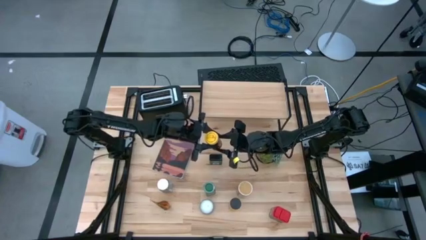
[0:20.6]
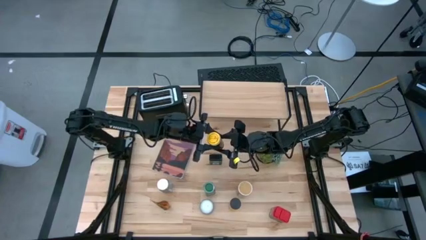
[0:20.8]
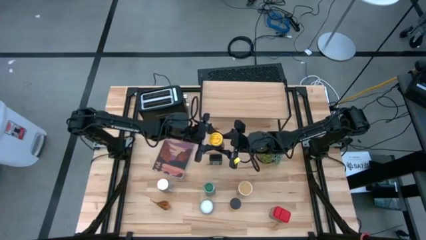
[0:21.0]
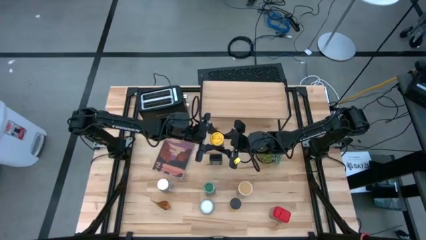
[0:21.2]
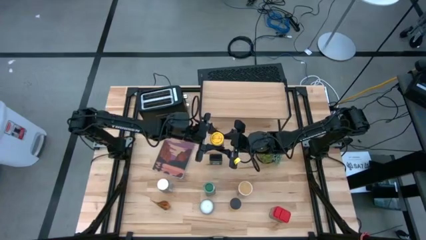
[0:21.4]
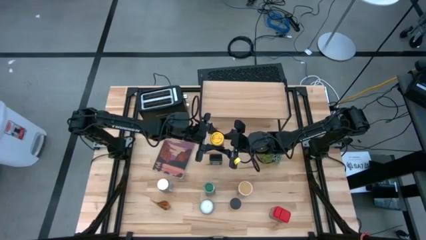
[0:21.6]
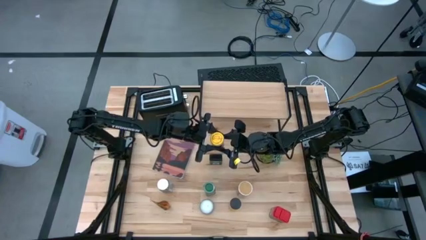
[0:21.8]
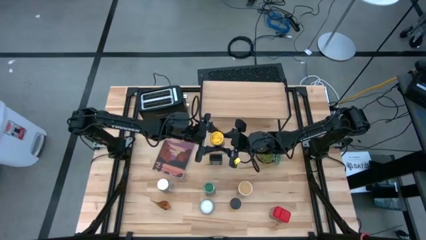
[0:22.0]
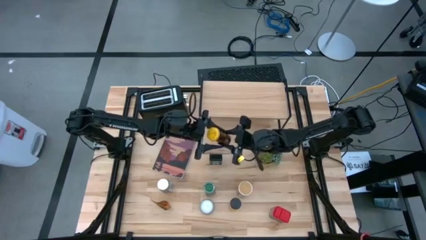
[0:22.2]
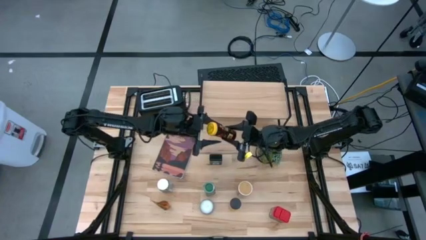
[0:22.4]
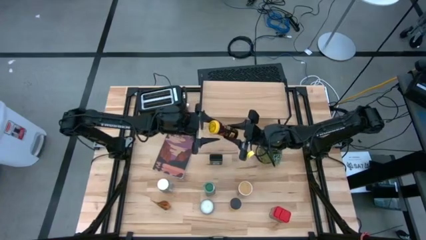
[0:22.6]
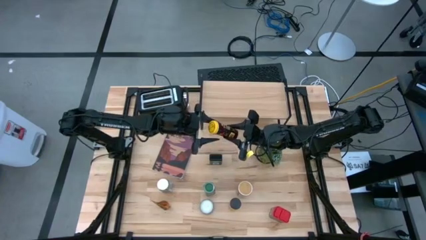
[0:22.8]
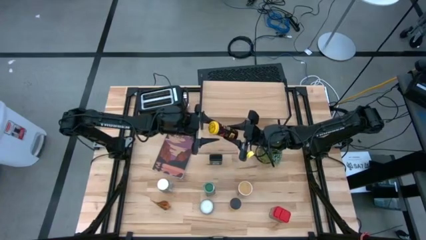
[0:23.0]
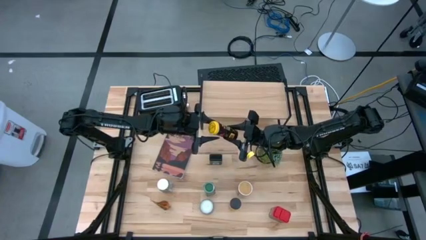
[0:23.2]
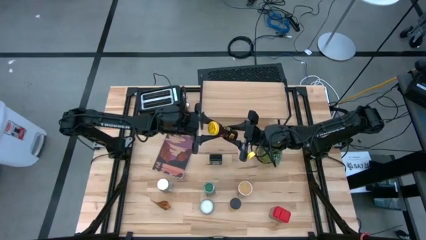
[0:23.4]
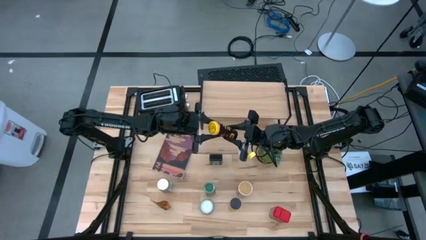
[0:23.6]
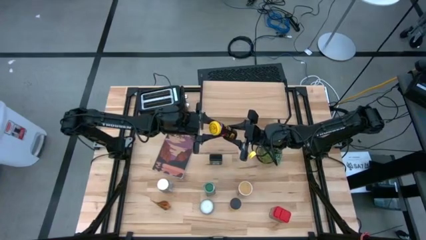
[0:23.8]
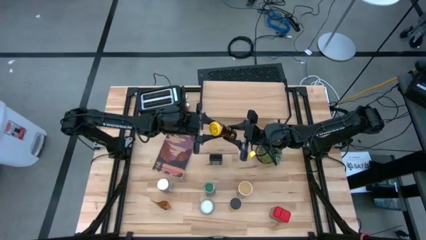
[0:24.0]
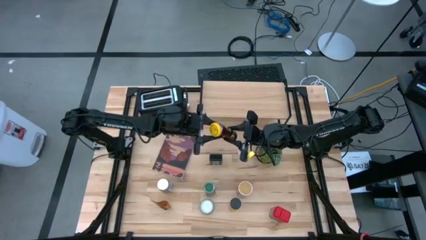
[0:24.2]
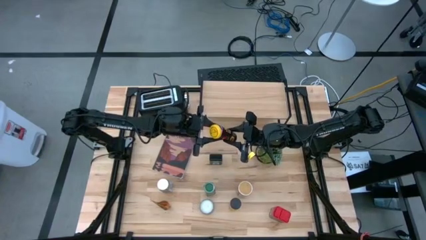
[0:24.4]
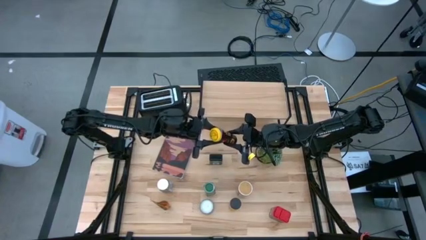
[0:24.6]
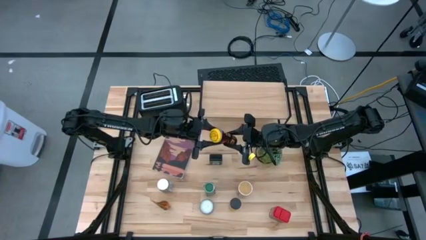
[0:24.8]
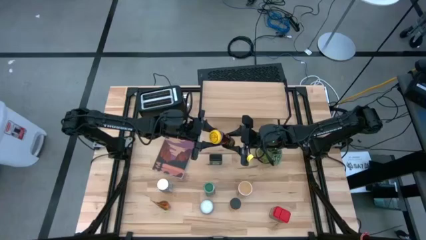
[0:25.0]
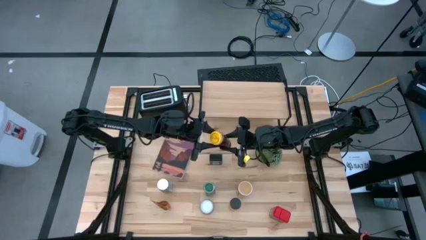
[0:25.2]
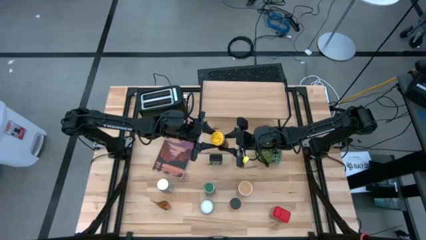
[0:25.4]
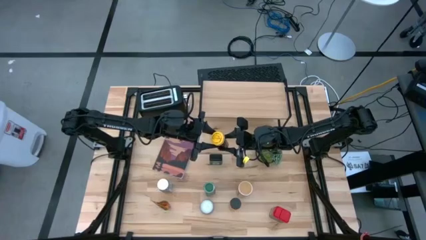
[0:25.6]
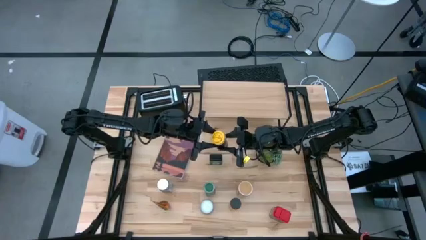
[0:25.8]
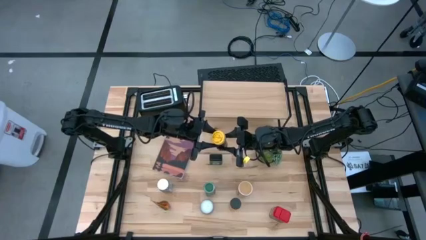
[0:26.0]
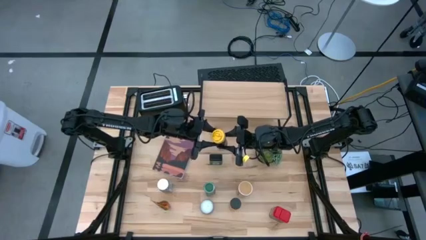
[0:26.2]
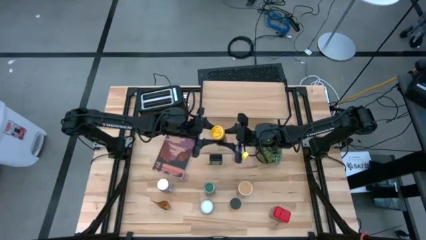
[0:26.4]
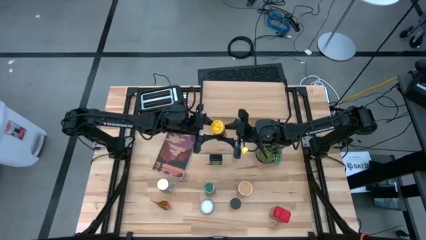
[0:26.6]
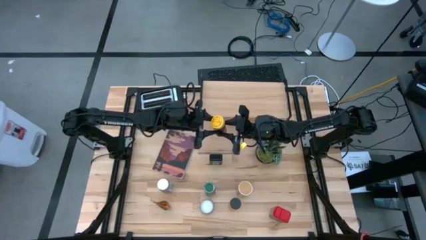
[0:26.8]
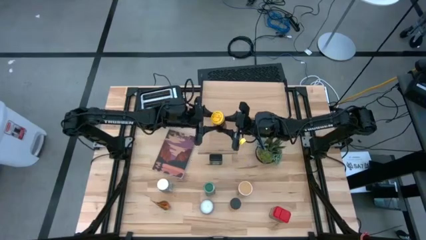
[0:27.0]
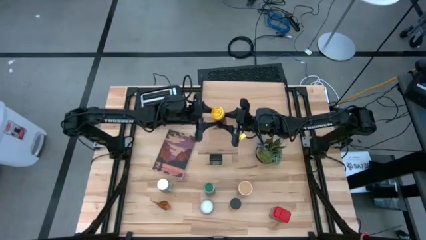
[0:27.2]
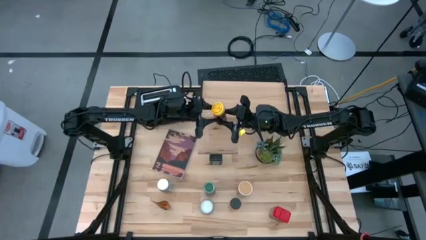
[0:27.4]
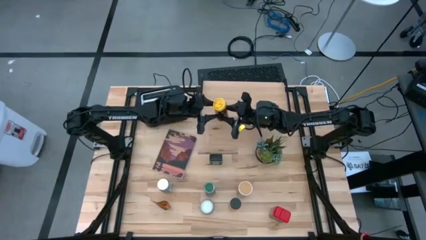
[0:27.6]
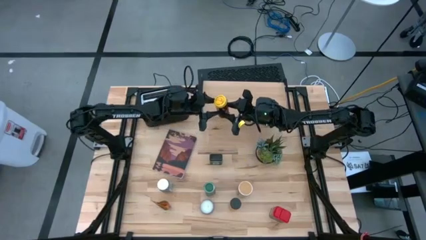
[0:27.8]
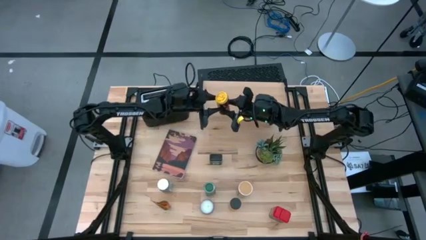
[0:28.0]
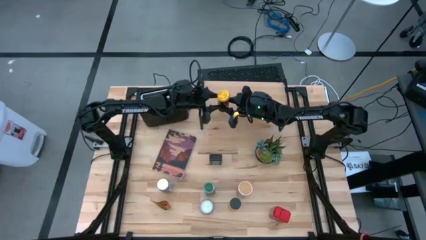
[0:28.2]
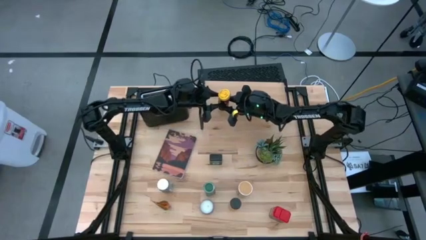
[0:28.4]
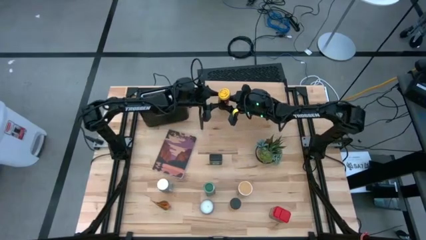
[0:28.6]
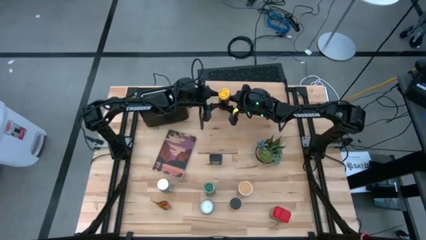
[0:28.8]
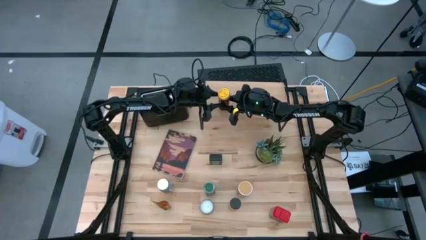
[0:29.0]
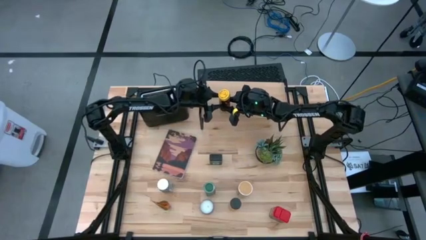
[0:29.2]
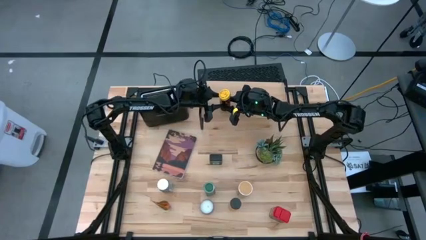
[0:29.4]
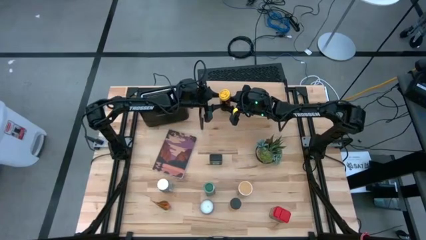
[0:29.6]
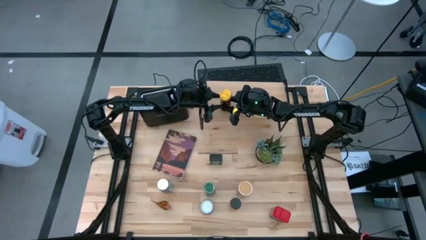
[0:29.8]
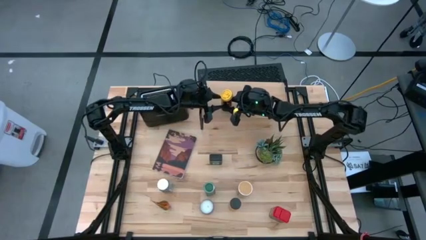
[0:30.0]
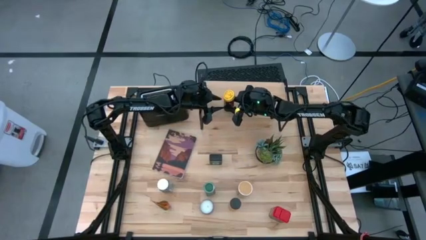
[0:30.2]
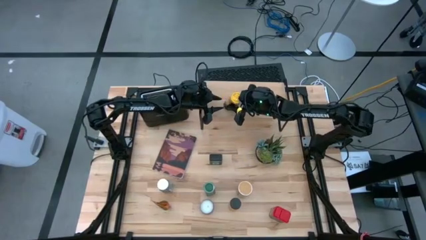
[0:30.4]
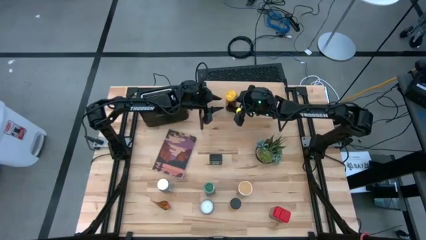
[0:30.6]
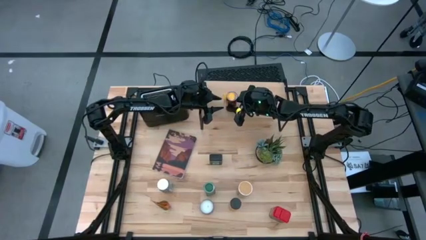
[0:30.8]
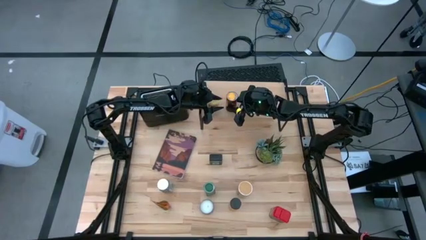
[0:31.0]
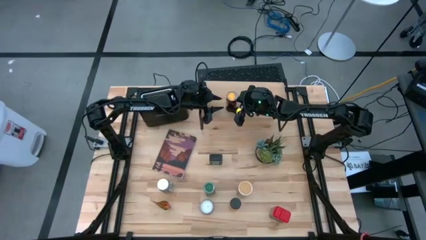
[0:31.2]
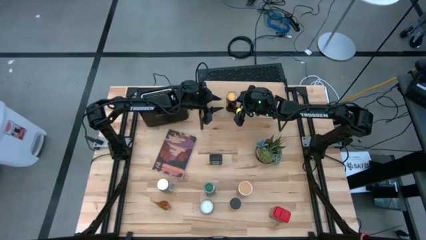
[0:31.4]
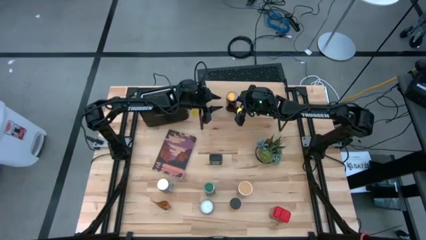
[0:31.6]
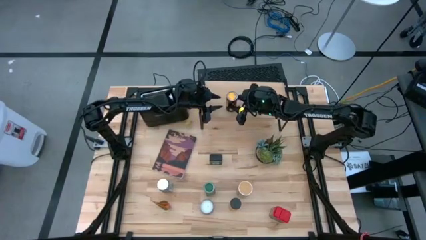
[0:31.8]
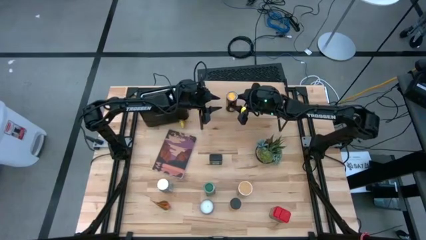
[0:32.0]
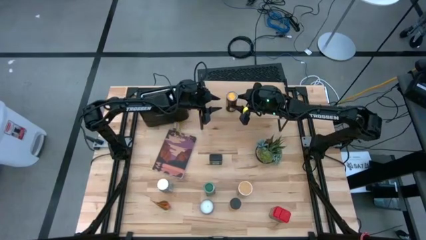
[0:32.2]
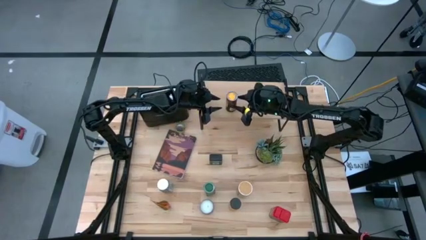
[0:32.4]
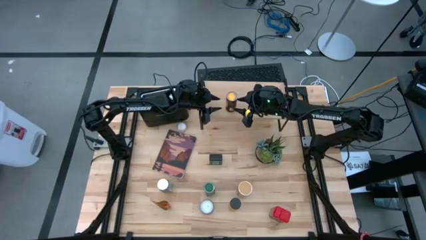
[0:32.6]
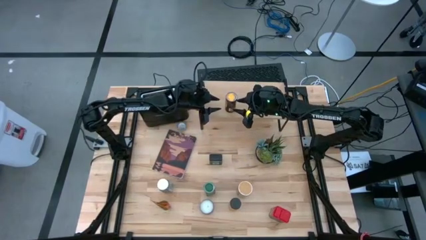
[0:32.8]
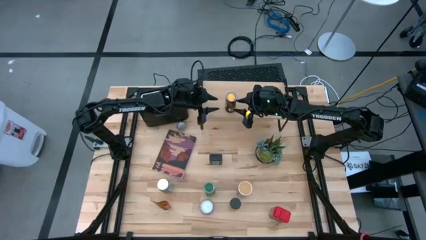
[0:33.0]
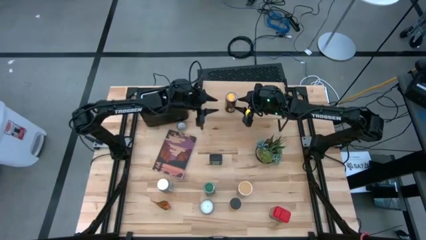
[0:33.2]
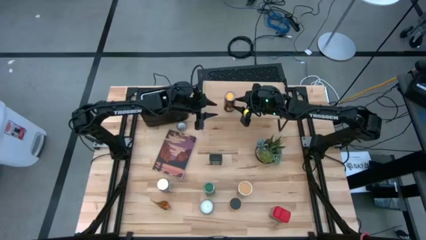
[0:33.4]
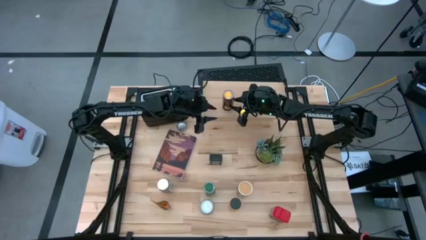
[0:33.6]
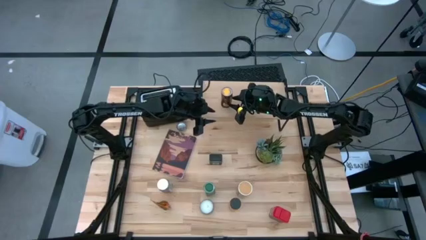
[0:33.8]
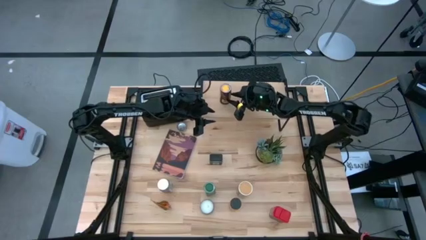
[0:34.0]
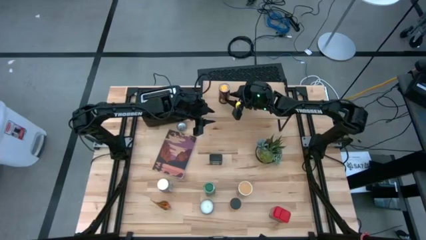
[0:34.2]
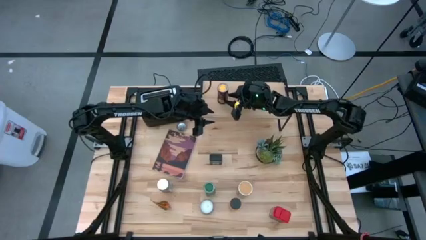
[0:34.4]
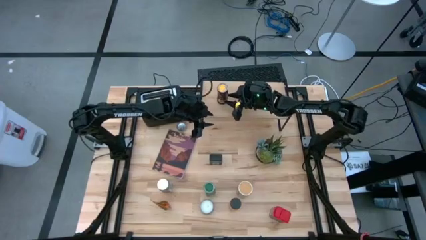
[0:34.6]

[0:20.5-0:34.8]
Task: Shelf spices
Put the yellow seasoning bottle on the shelf

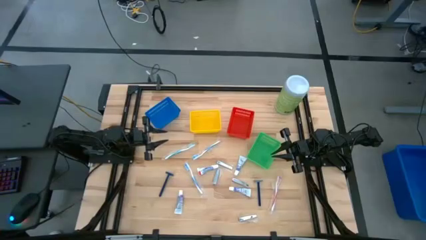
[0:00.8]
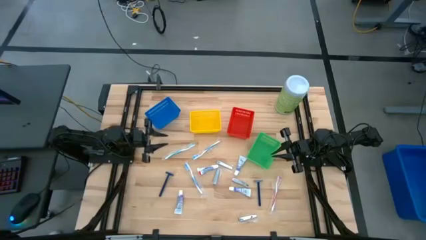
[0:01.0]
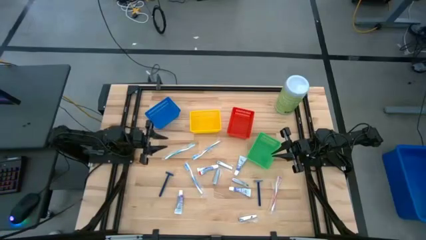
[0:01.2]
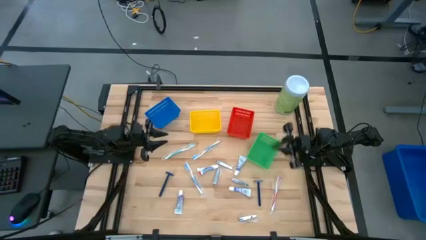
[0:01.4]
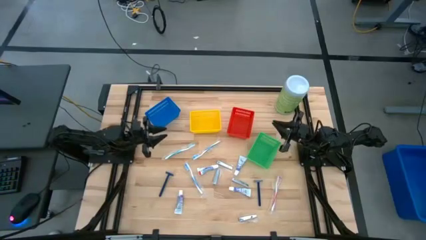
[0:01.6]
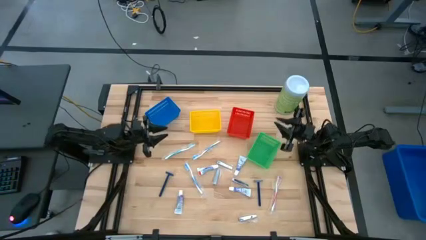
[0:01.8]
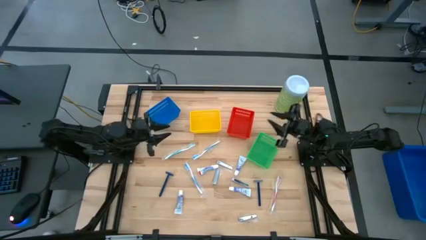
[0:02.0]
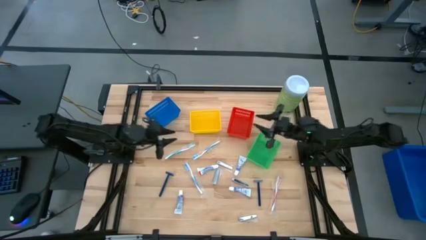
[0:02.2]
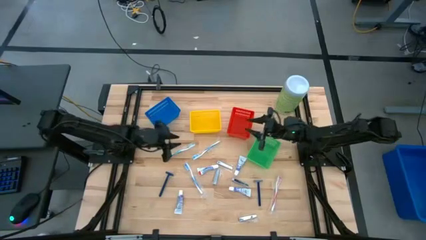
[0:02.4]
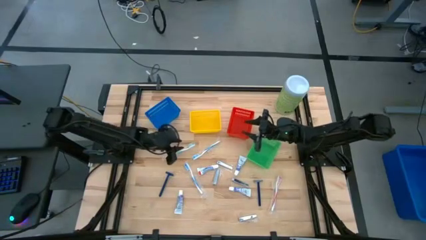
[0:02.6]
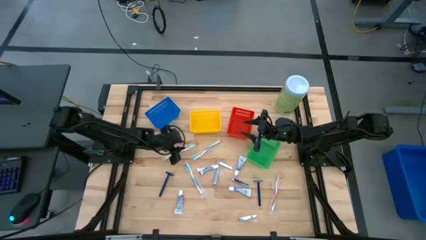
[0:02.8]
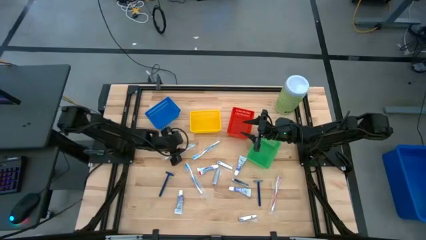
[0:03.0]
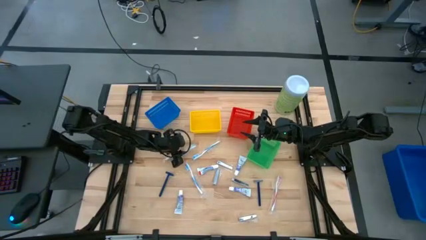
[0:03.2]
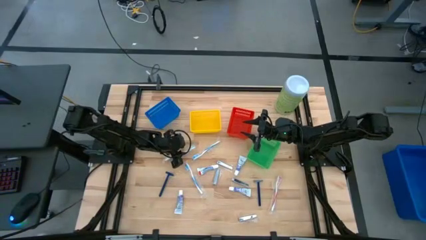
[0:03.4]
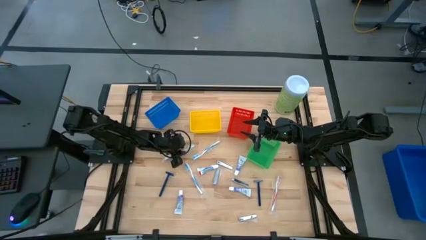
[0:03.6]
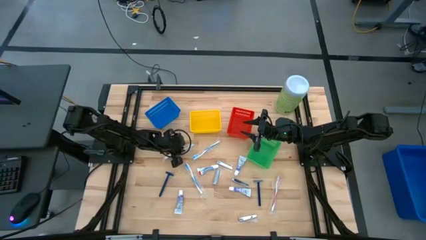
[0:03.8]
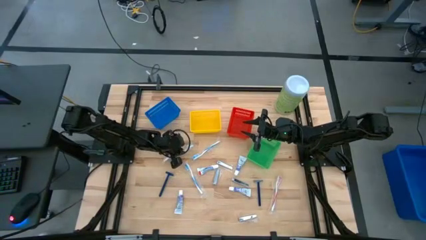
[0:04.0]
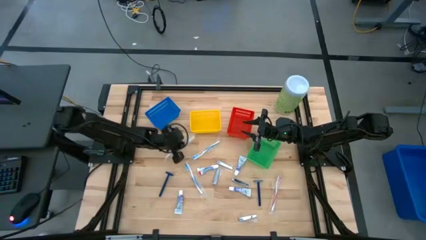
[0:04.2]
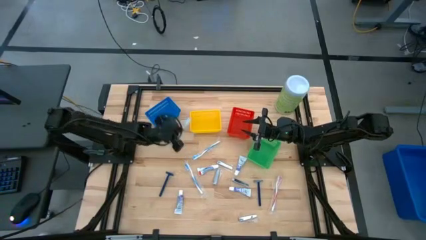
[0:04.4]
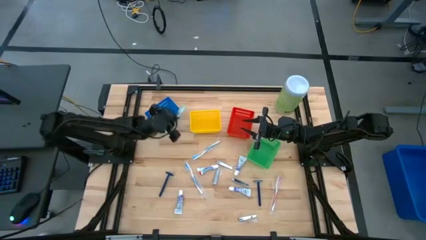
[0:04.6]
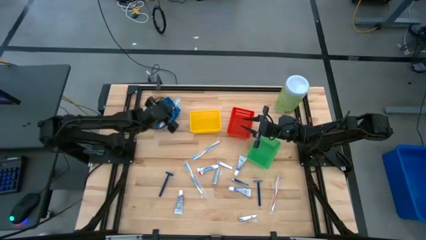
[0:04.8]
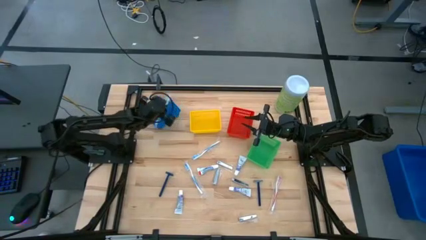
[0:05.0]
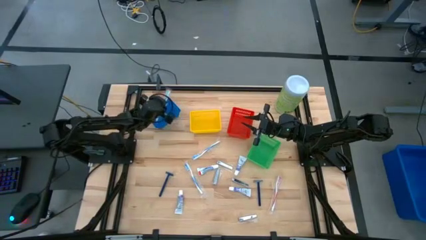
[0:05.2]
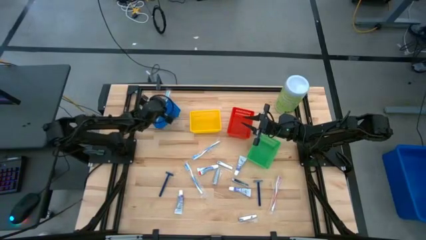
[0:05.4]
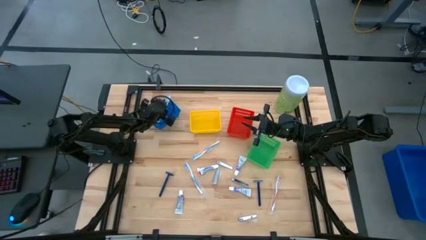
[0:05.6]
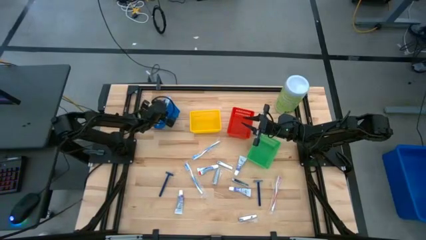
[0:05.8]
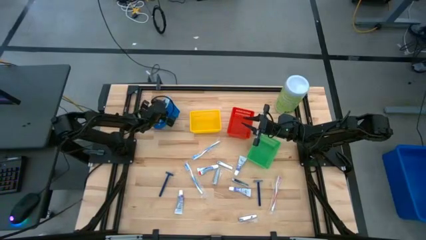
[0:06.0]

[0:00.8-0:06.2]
Task: Pick & Place Travel size toiletries
Put the green toothbrush into the blue bin
